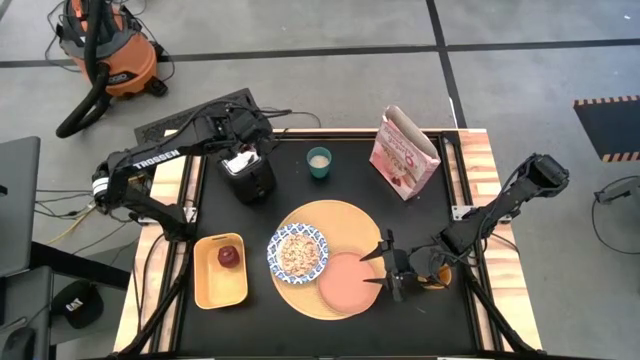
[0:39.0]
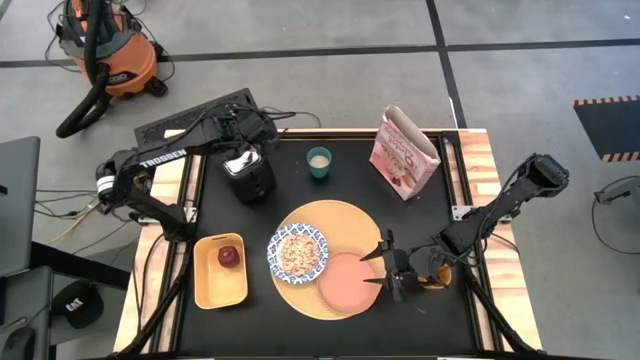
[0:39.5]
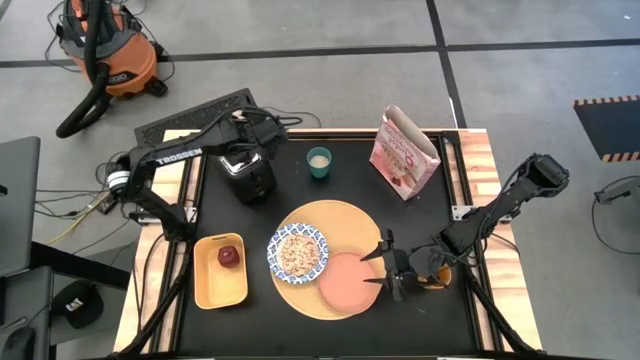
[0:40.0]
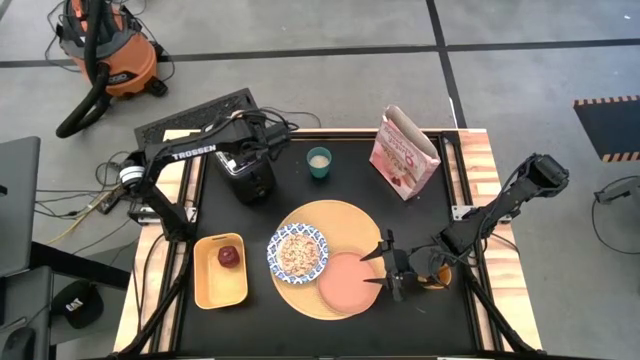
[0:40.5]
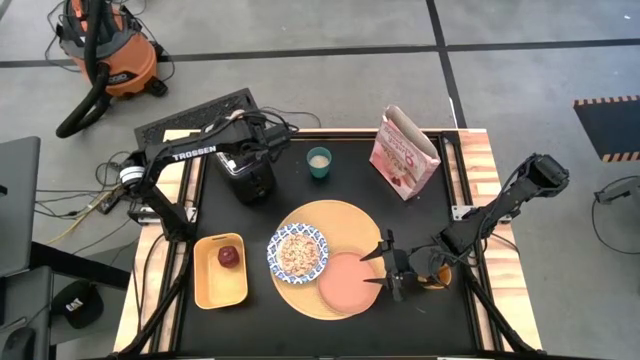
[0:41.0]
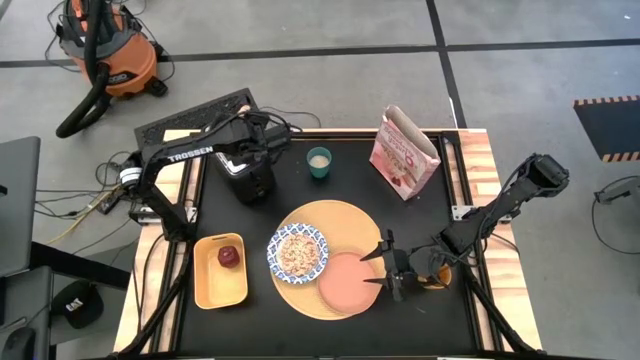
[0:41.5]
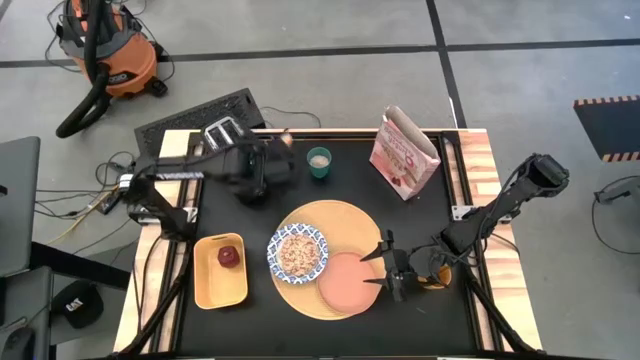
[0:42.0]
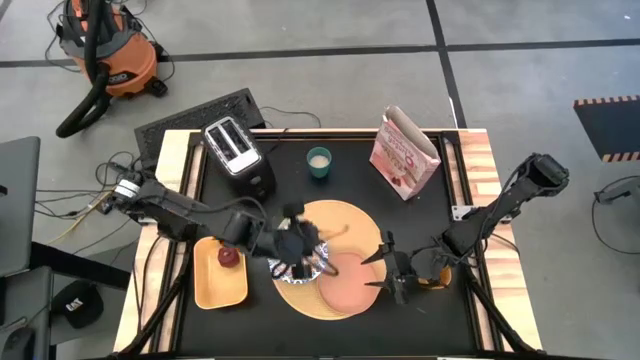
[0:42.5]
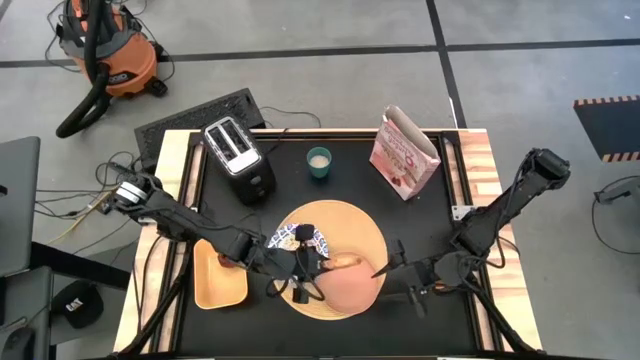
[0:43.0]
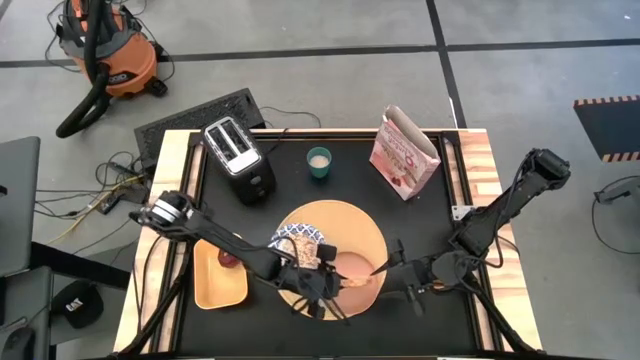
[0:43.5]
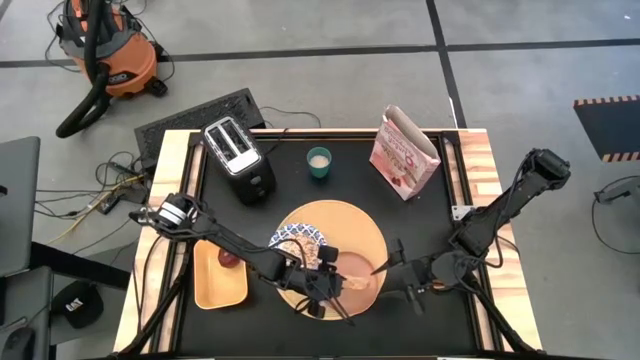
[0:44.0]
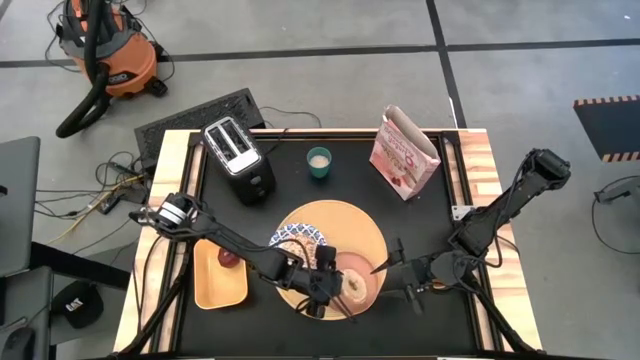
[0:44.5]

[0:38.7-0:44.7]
Task: Arrange a breakfast setting
Put the bagel on the plate

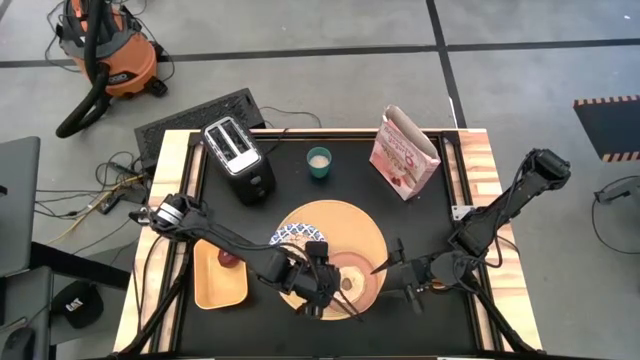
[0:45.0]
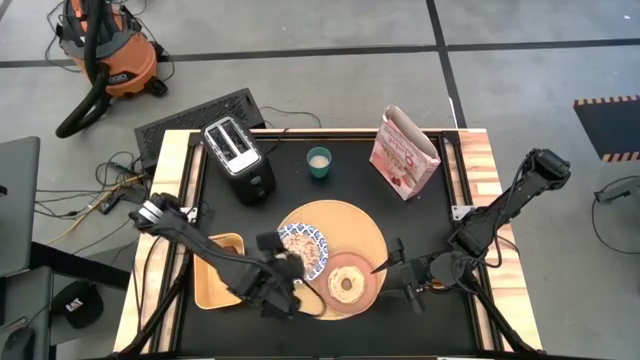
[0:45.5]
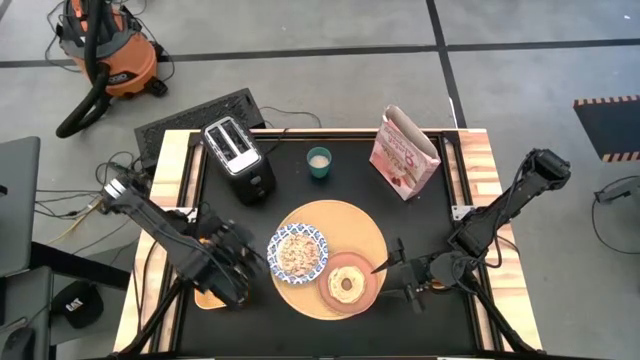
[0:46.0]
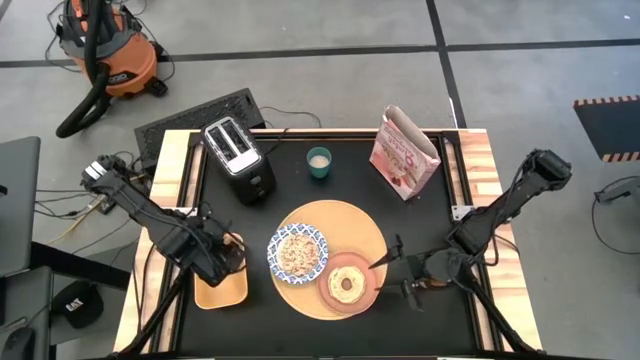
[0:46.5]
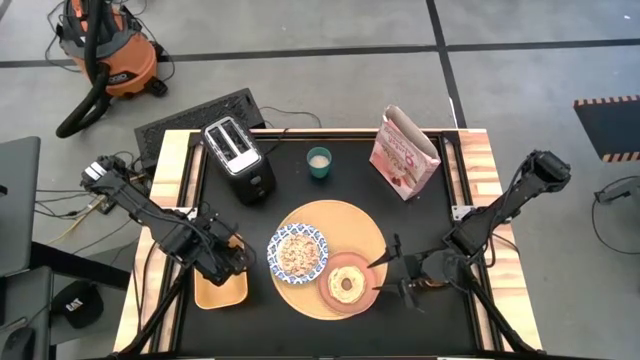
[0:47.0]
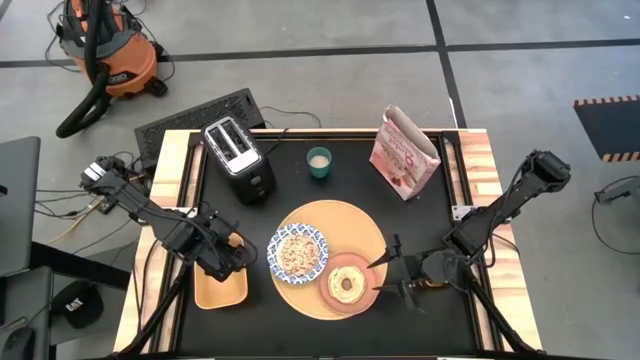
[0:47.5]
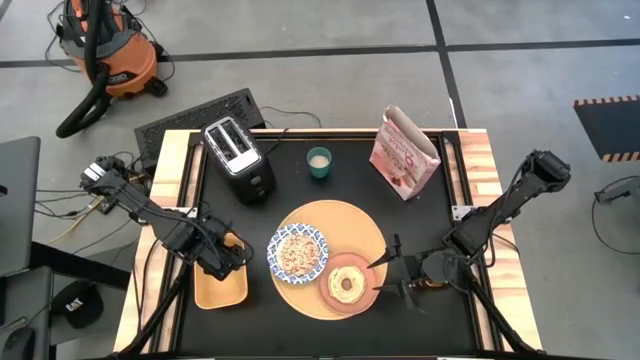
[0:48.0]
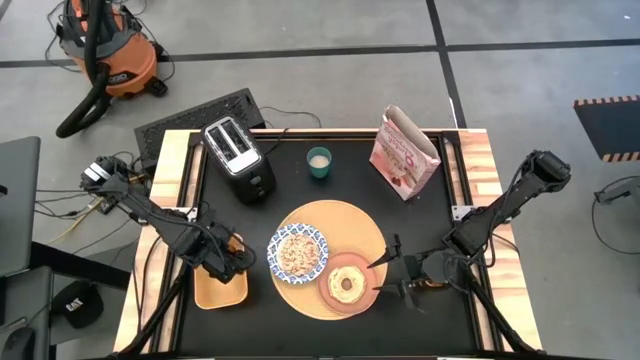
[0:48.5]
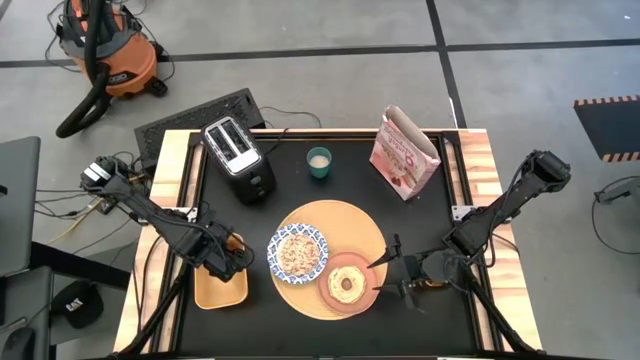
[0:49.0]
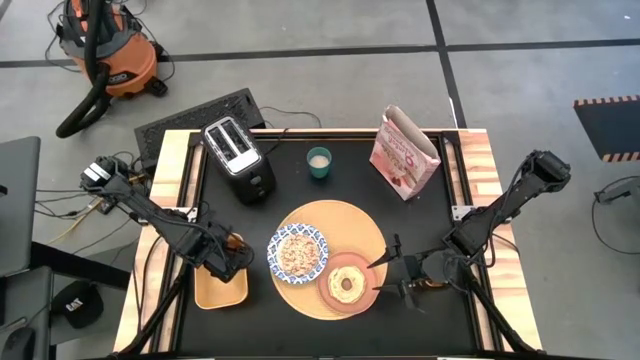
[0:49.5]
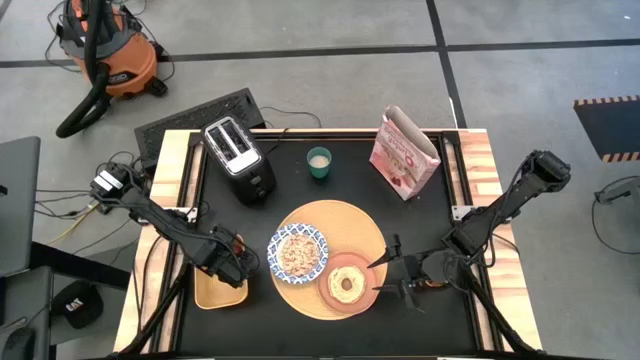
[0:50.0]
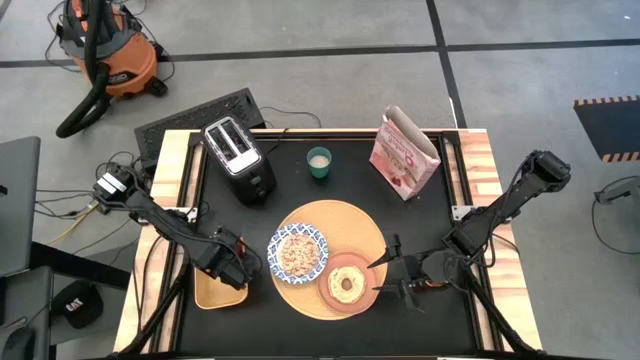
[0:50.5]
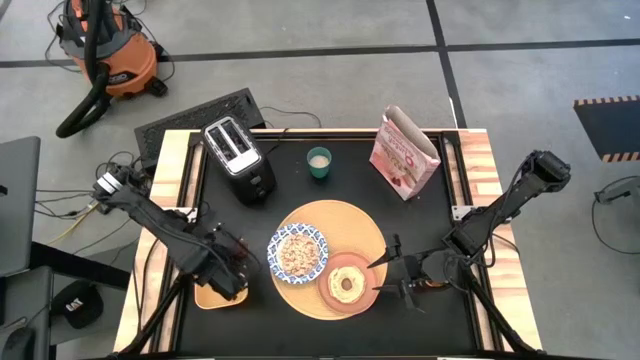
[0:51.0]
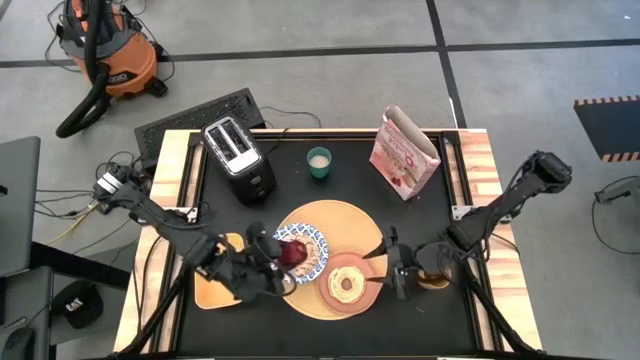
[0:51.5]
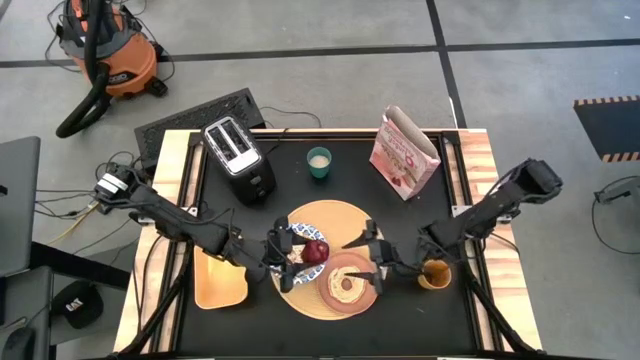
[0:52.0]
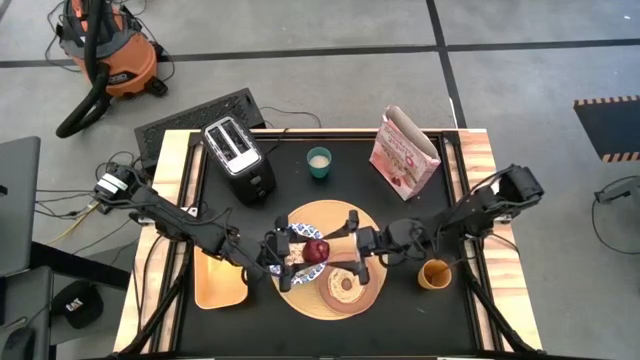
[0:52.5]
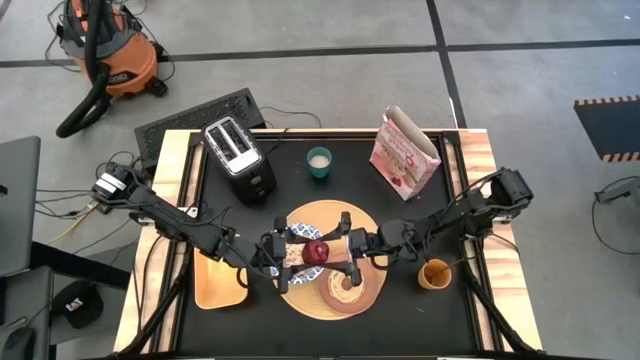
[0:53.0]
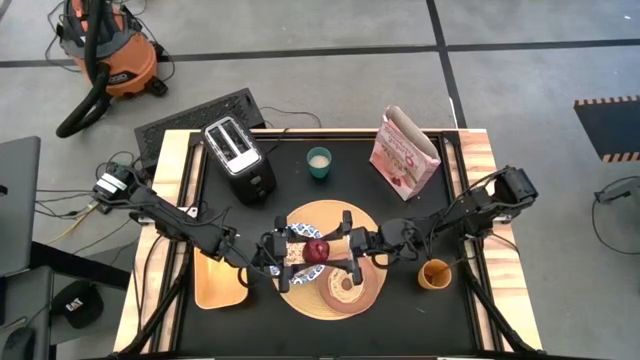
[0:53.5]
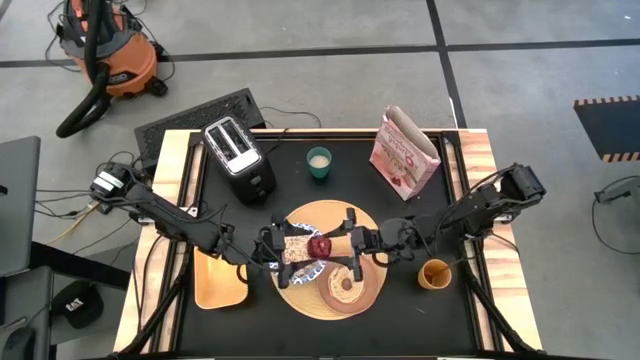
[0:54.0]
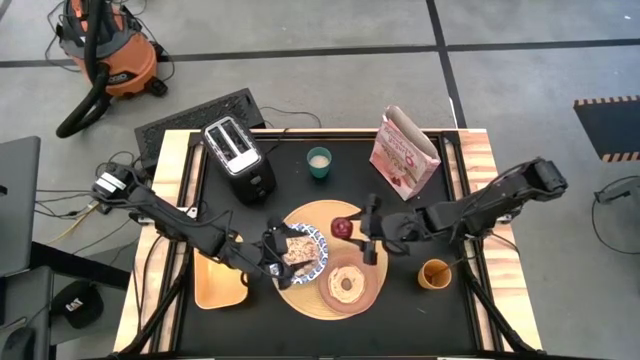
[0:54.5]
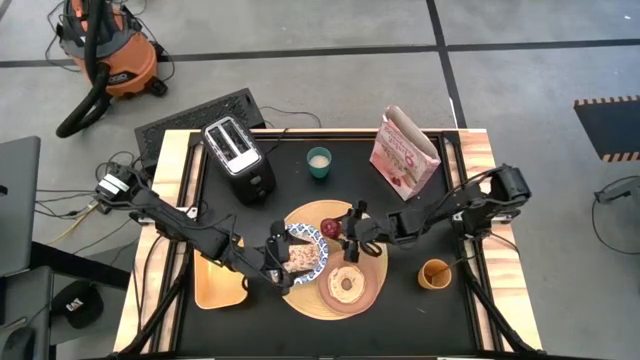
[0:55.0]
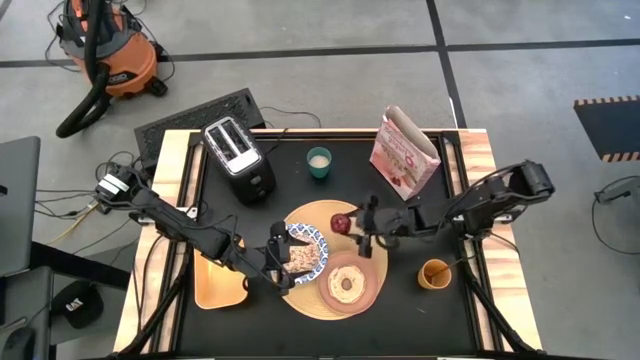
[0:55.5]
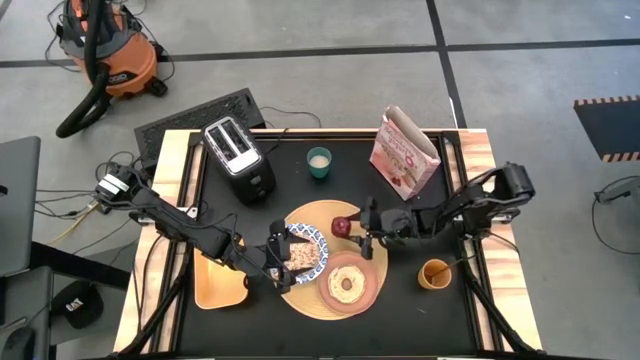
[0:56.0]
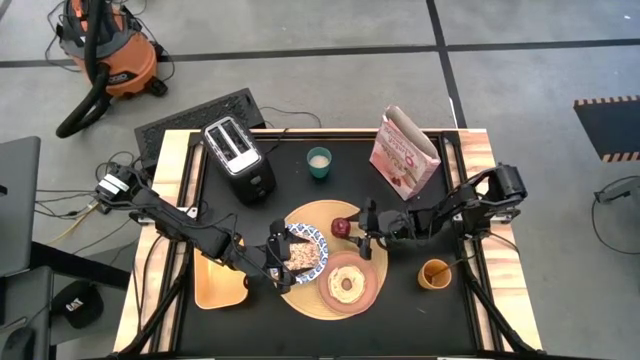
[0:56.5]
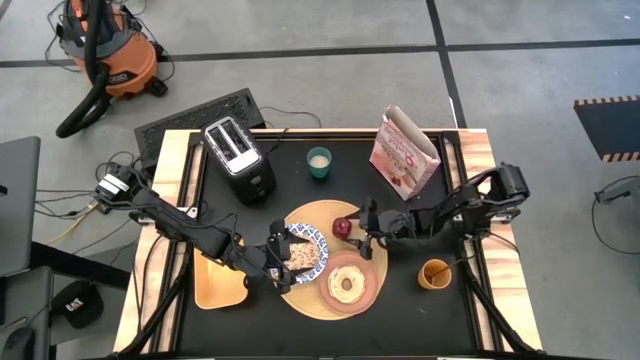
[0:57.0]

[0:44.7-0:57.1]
Put the apple on the table mat above the plate

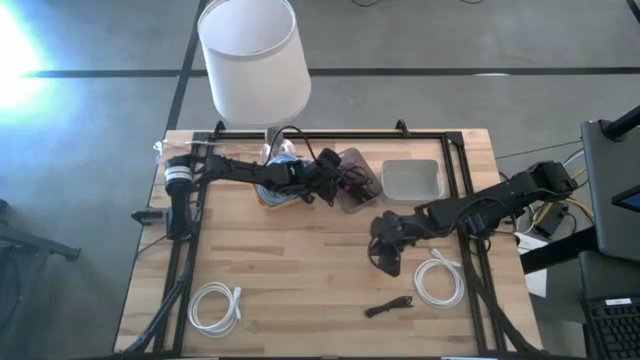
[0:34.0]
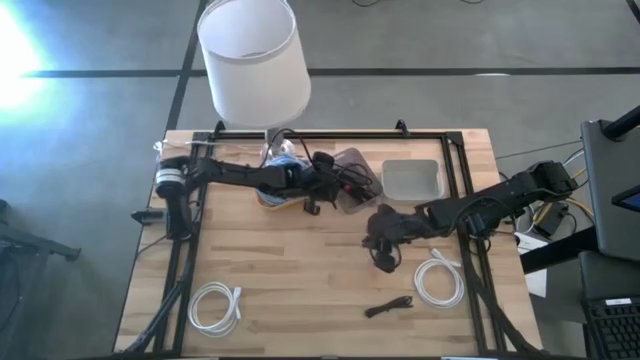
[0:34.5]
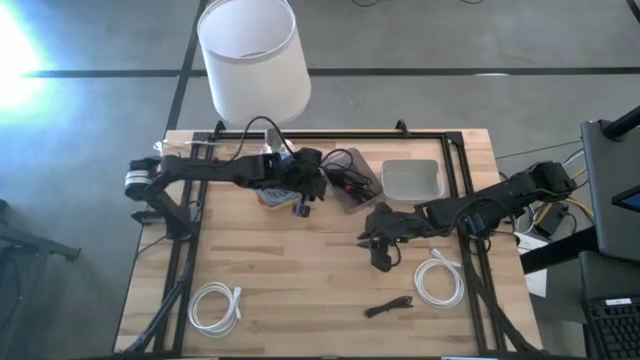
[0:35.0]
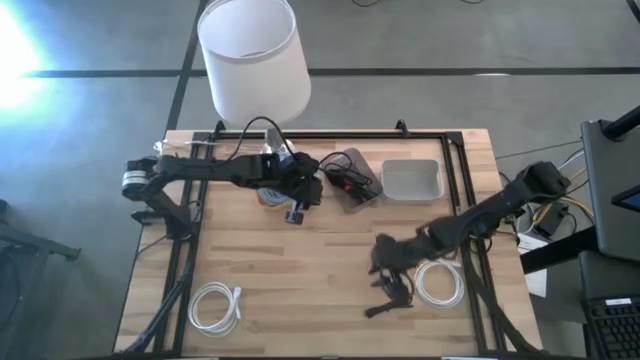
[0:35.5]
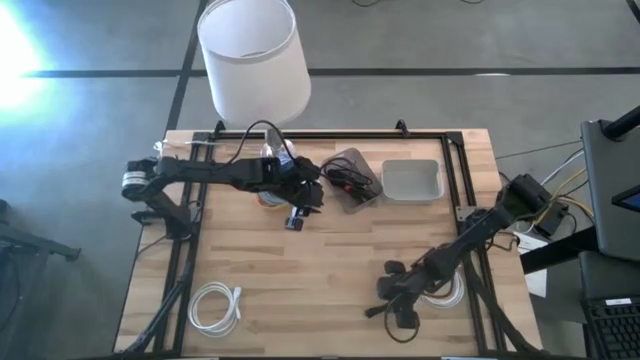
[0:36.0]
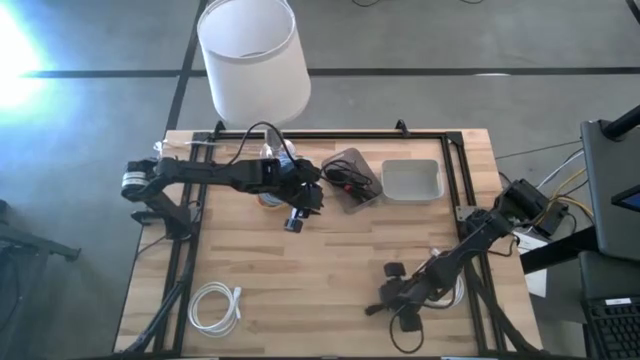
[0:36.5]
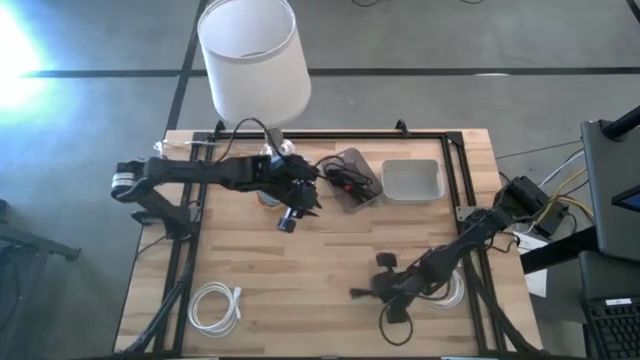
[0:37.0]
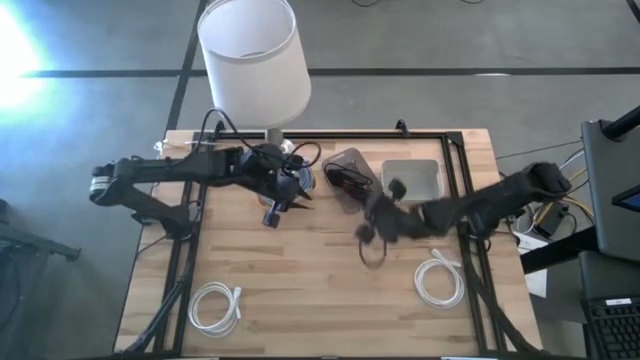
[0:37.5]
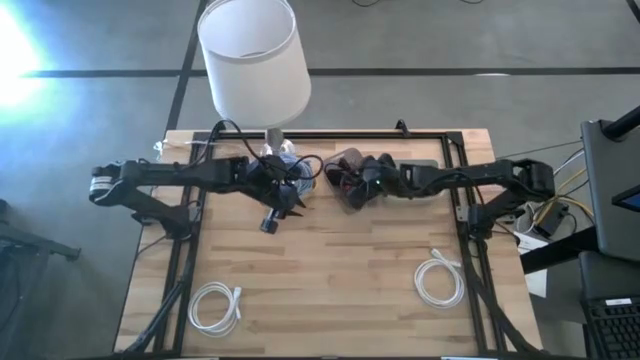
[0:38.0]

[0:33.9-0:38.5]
Task: Pick & Place USB Port
Put the black charger cable into the black bin
